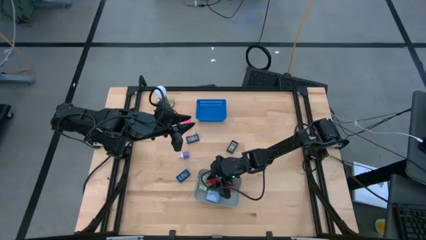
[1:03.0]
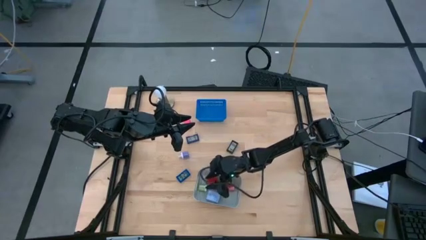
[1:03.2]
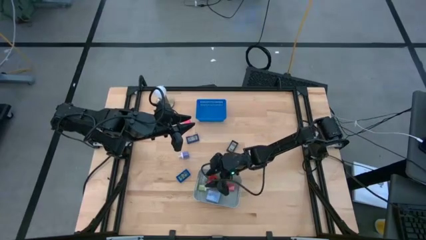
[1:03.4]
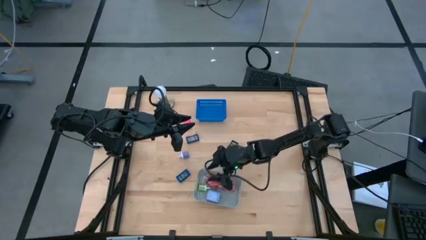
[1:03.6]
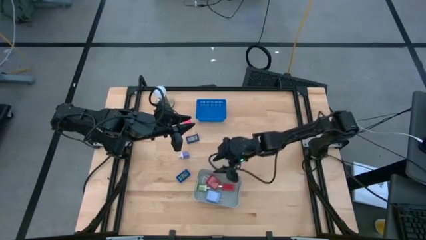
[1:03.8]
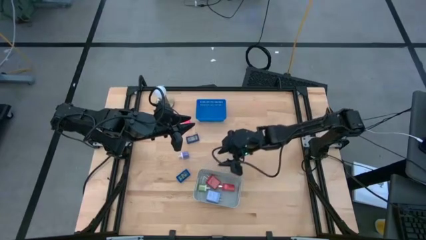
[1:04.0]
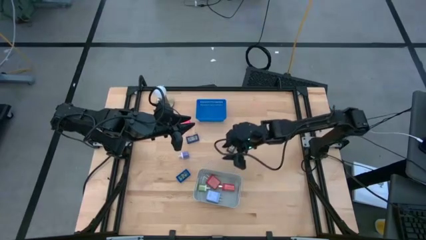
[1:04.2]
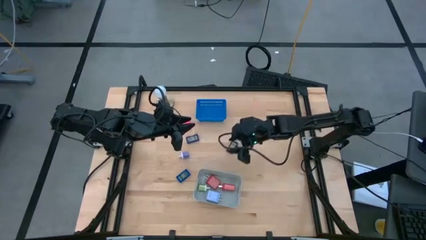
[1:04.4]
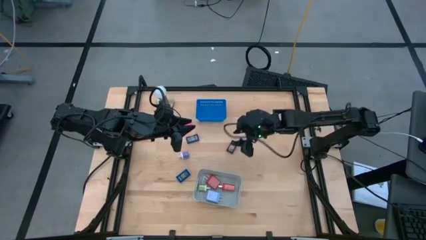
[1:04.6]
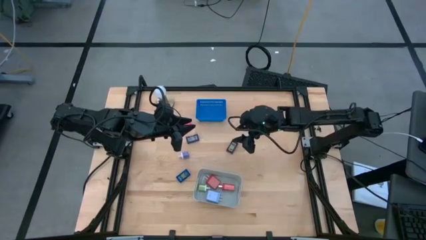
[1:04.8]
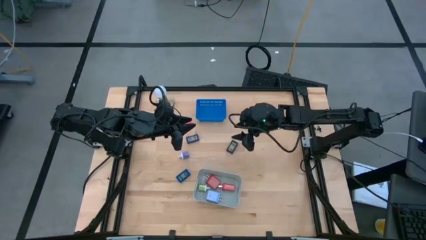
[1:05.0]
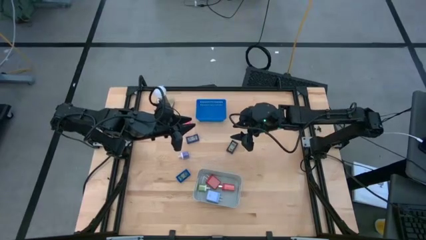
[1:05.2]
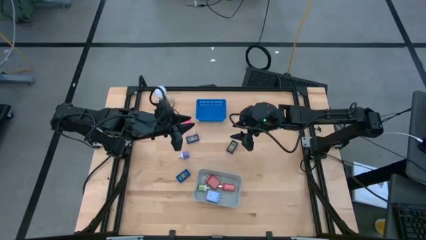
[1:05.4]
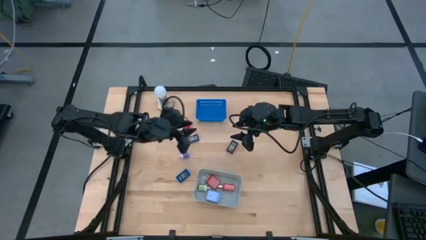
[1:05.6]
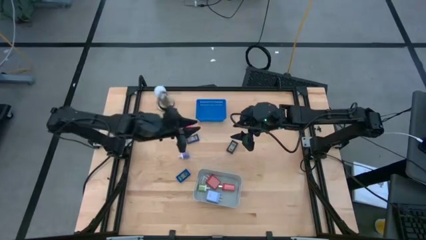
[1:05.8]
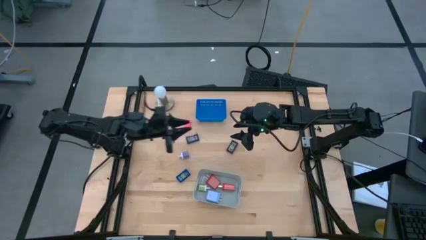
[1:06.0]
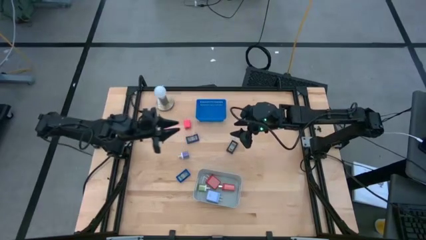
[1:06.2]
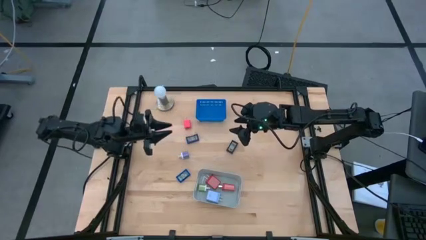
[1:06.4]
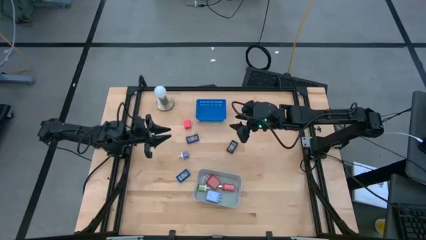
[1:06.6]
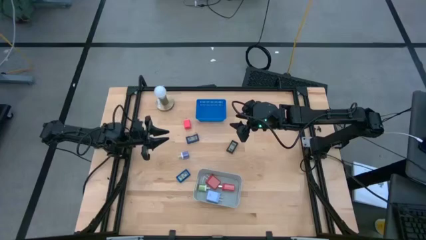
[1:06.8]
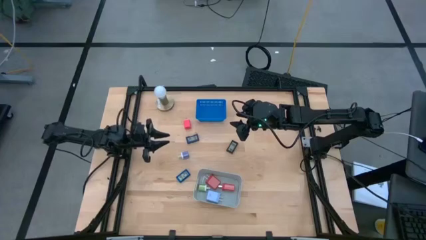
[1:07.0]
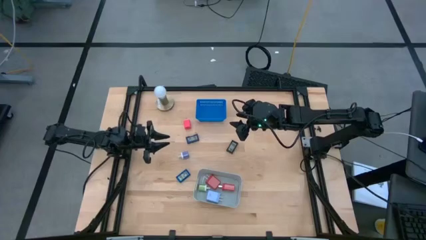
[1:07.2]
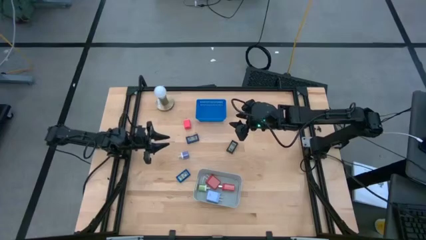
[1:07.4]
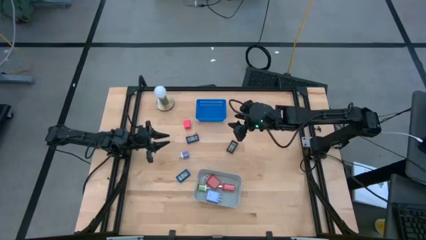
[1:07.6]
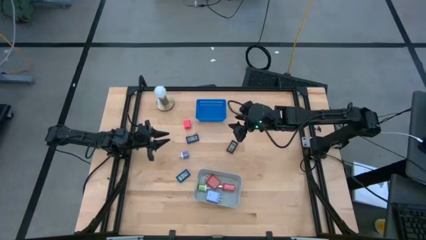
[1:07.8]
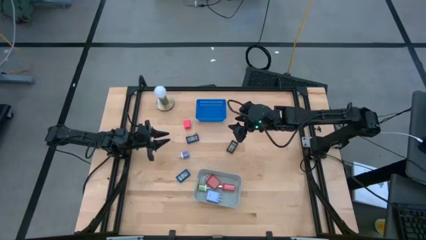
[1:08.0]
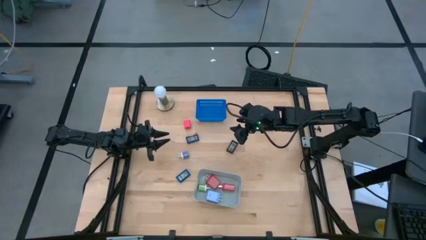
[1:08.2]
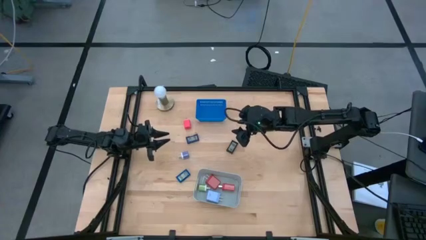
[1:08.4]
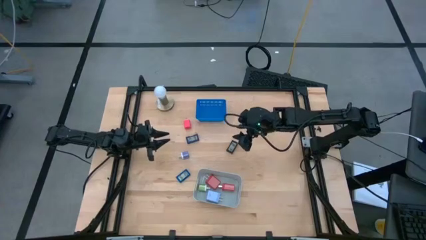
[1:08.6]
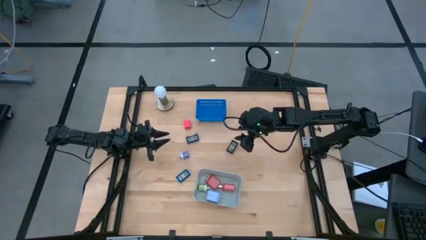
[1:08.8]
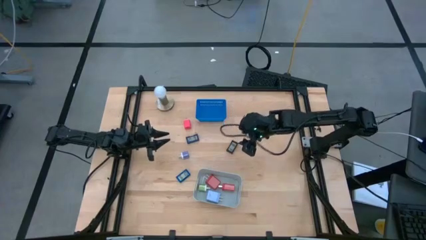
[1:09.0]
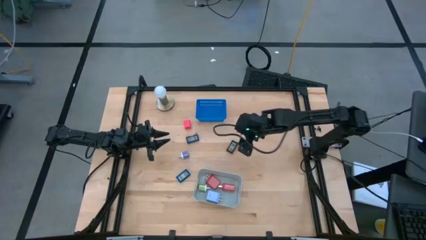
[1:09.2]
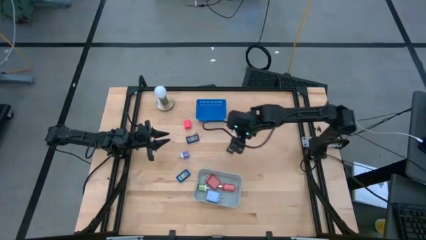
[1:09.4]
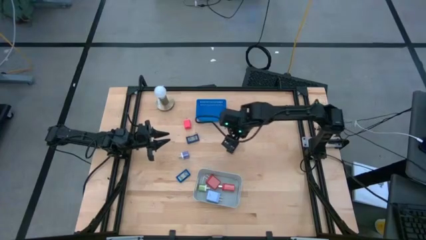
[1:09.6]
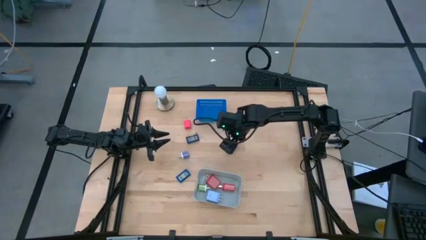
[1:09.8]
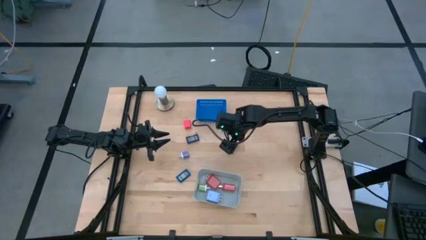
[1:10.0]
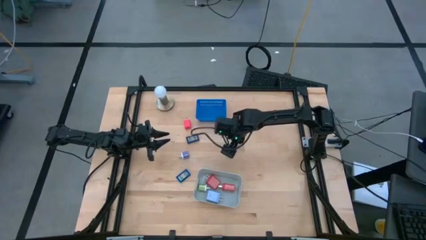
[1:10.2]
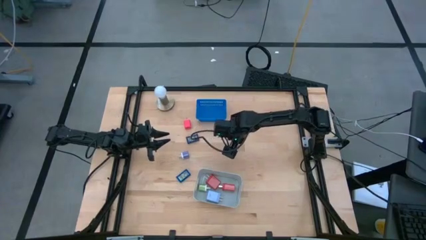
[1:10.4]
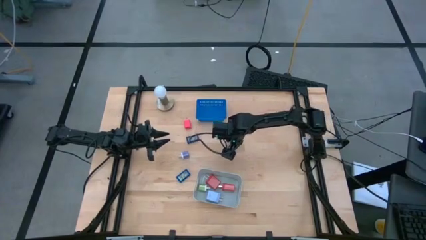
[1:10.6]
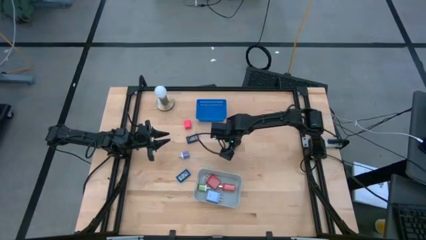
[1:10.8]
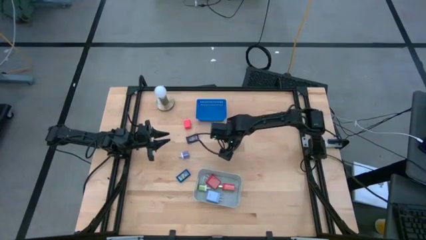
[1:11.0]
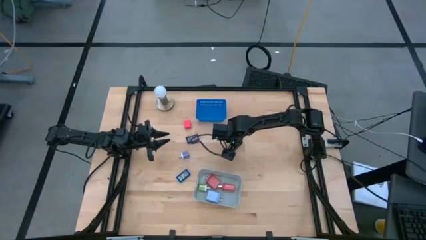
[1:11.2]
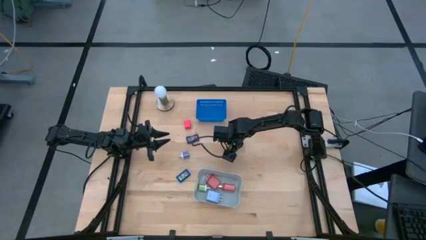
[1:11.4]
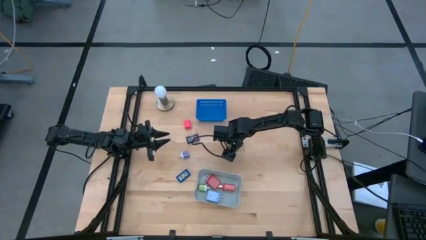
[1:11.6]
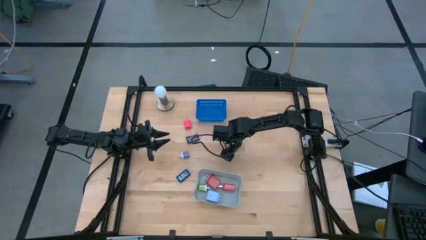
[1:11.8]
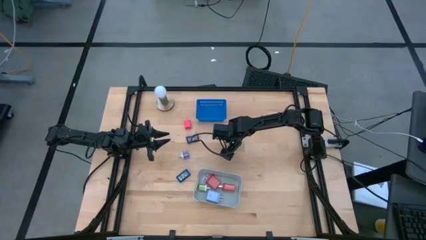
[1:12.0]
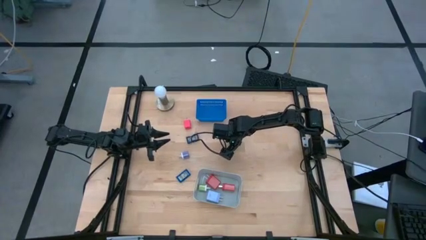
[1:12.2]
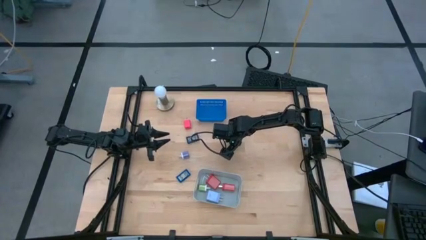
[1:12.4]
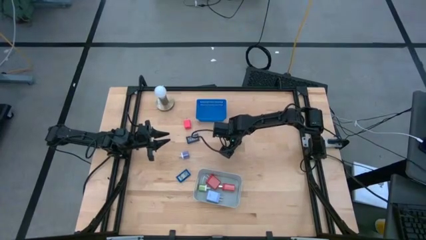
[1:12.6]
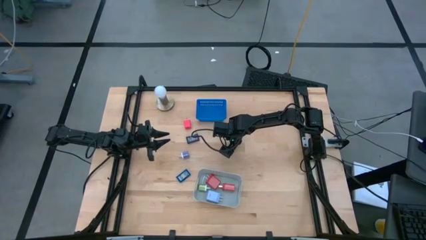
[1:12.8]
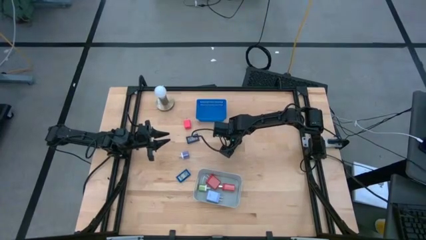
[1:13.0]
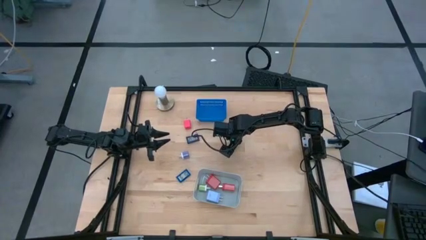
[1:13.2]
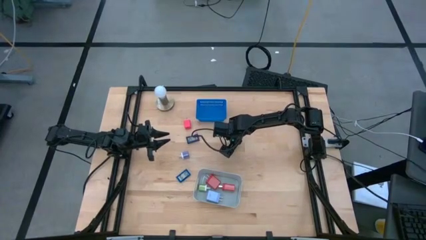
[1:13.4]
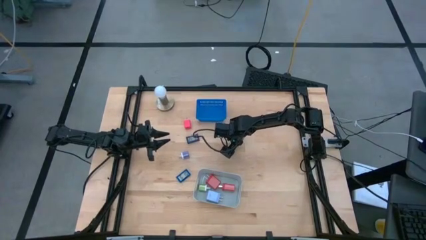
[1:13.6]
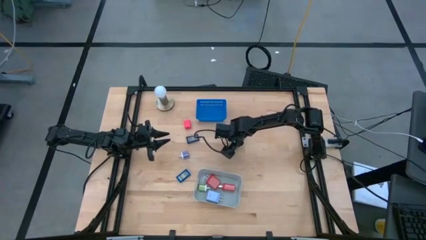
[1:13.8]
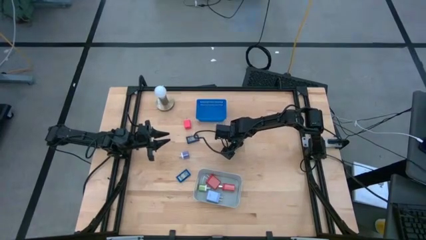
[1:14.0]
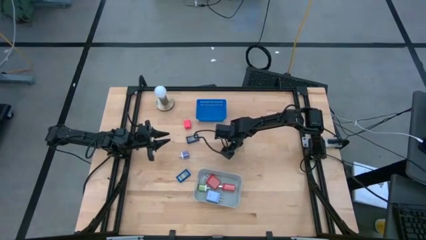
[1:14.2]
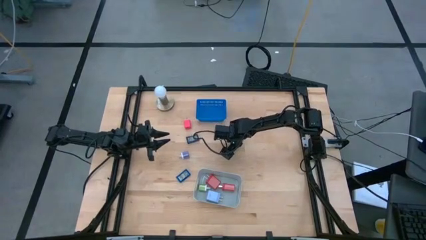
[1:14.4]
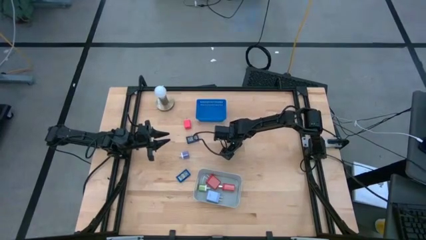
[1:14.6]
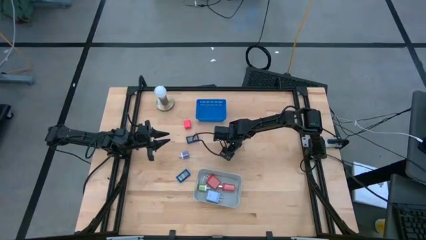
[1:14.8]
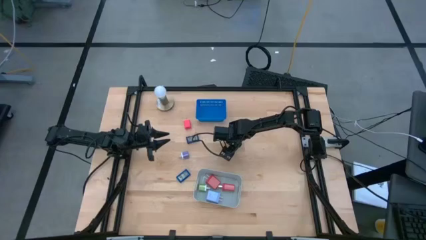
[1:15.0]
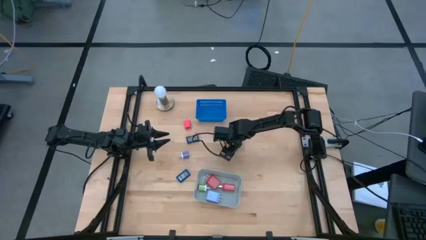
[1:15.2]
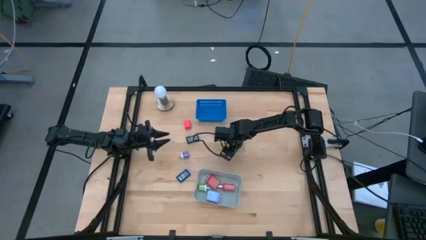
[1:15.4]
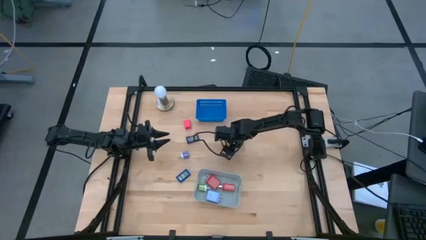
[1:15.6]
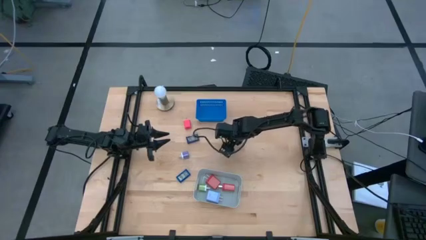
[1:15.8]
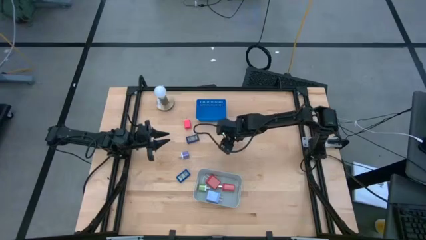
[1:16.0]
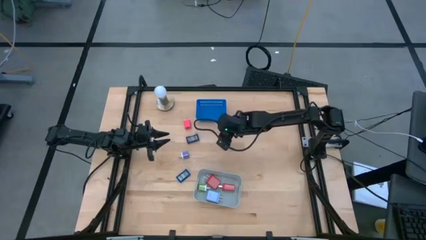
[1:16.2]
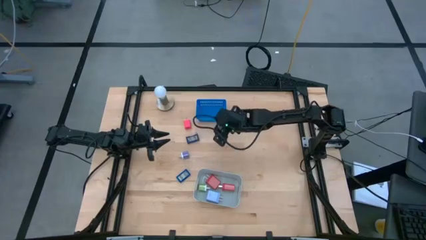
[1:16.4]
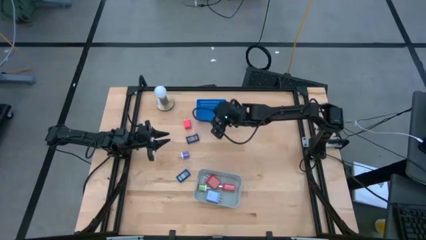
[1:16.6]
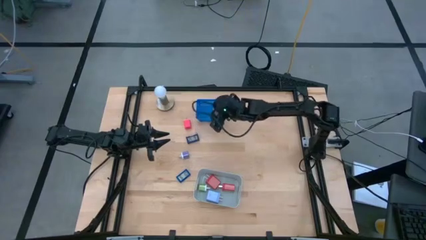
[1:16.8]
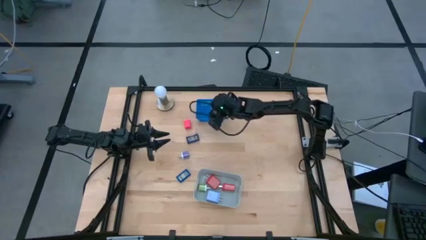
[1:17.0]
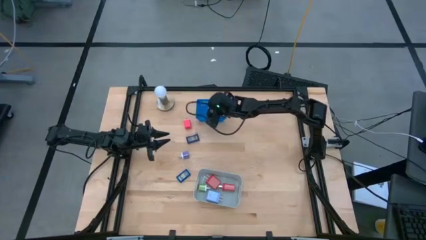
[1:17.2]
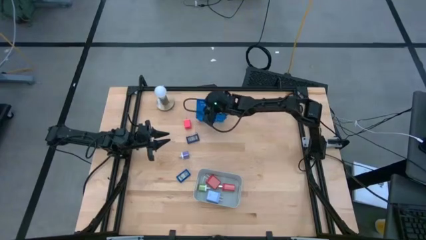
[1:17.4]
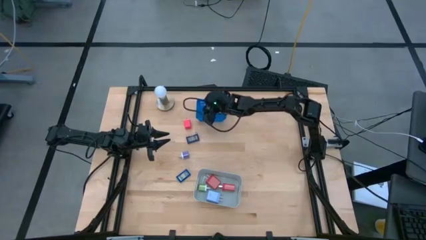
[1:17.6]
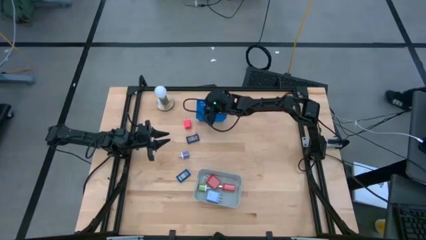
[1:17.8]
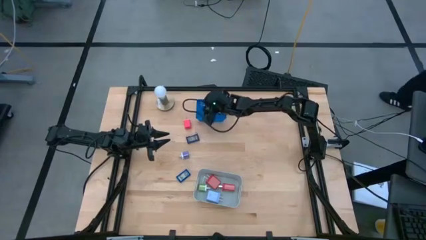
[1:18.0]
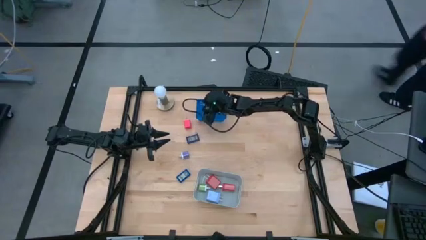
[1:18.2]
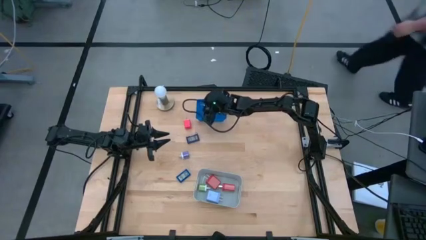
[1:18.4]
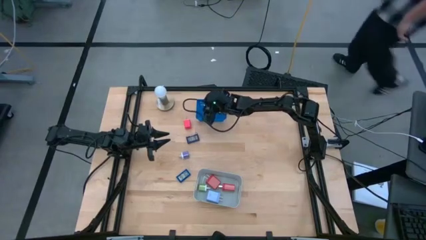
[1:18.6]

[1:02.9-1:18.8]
Task: Pick & Place Office items
Put the black digital clock into the blue bin
